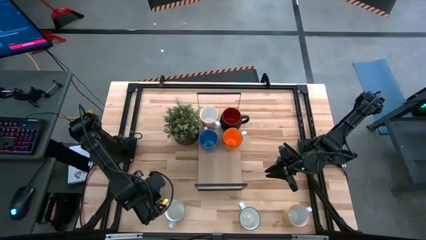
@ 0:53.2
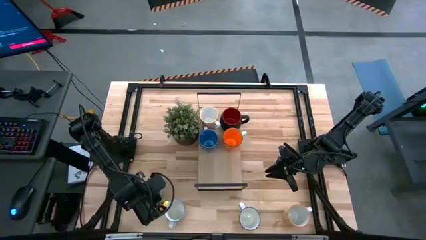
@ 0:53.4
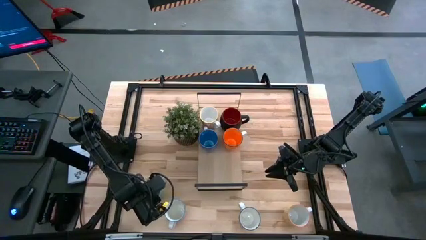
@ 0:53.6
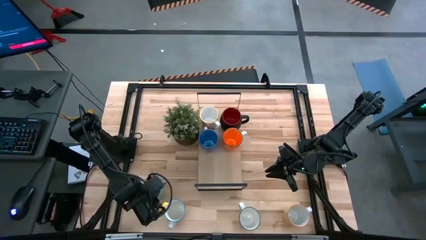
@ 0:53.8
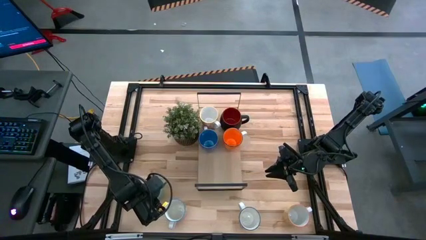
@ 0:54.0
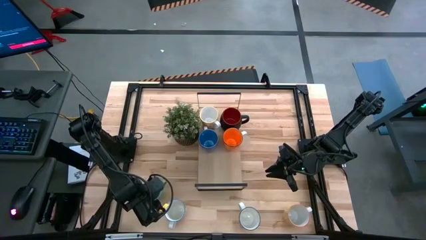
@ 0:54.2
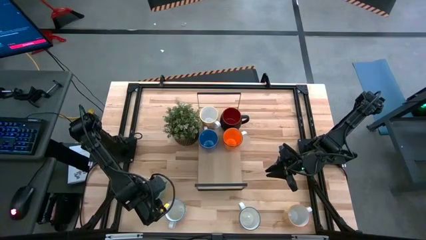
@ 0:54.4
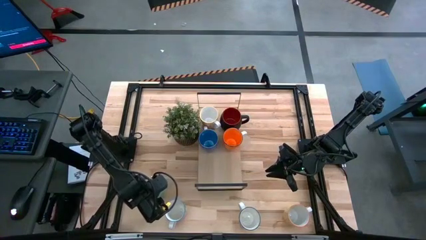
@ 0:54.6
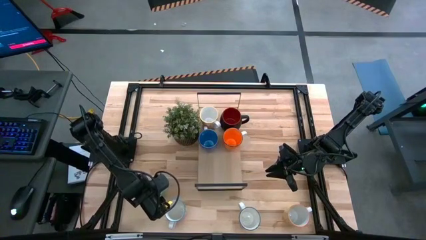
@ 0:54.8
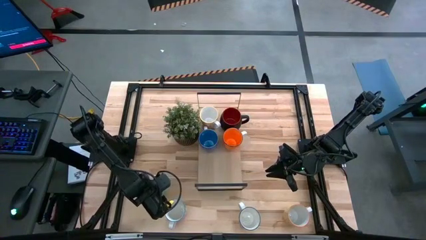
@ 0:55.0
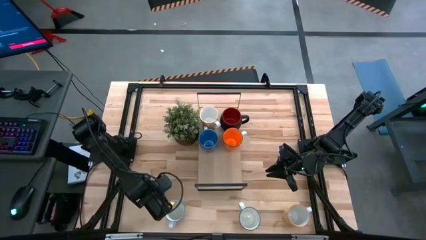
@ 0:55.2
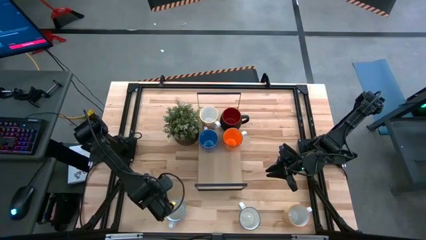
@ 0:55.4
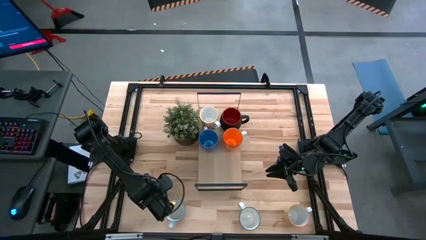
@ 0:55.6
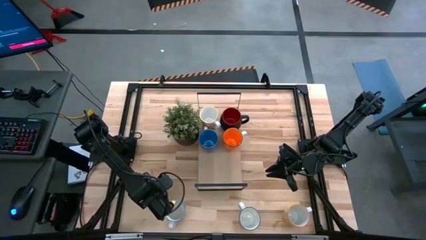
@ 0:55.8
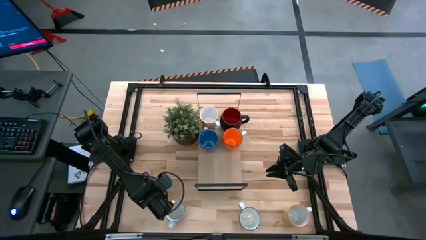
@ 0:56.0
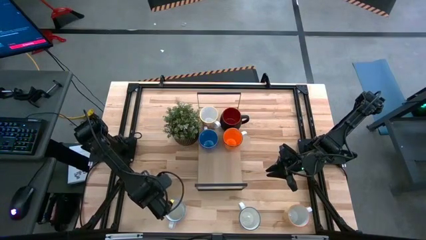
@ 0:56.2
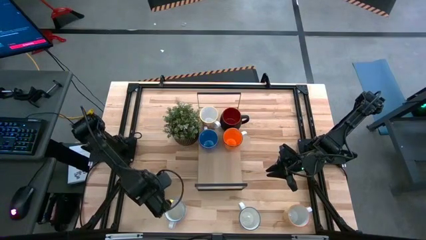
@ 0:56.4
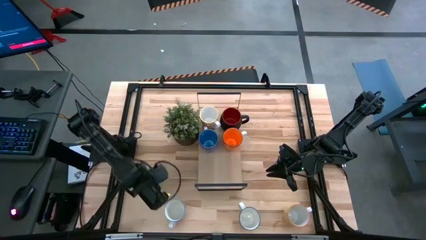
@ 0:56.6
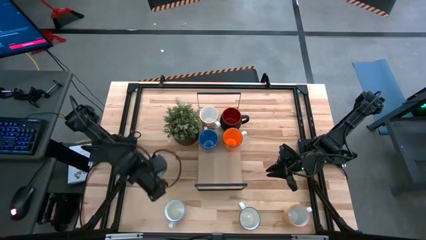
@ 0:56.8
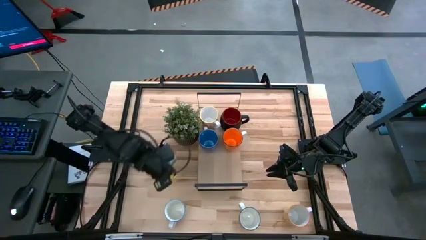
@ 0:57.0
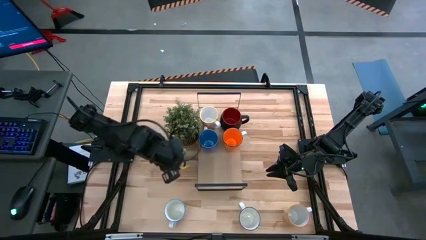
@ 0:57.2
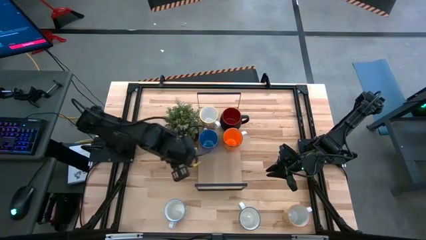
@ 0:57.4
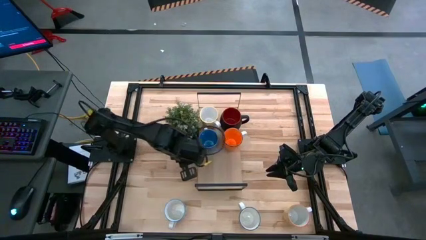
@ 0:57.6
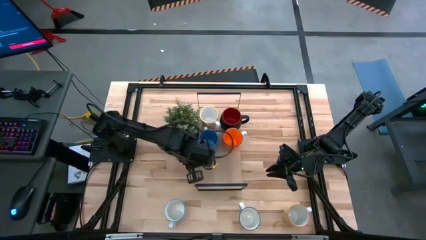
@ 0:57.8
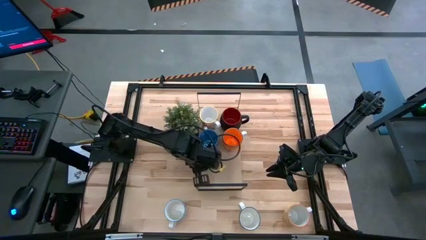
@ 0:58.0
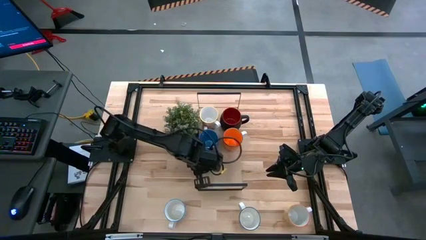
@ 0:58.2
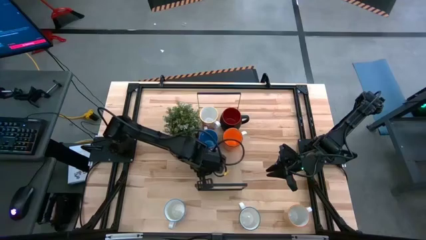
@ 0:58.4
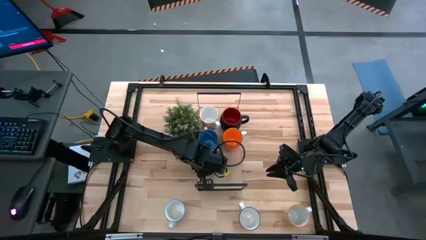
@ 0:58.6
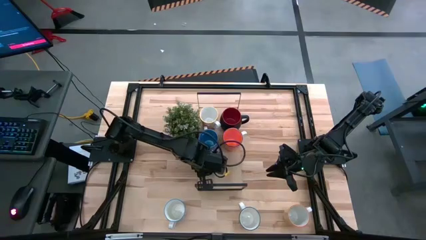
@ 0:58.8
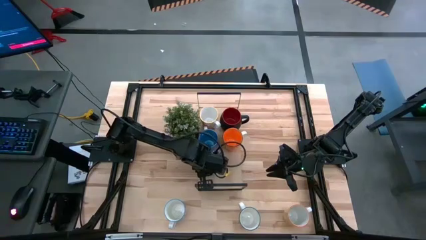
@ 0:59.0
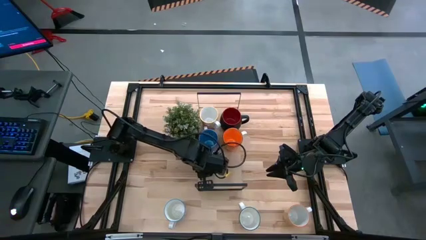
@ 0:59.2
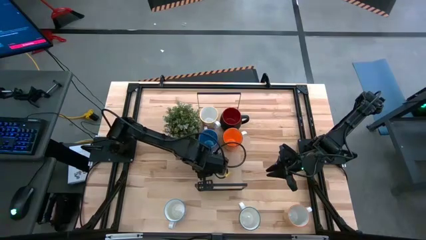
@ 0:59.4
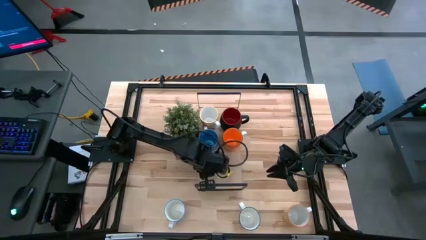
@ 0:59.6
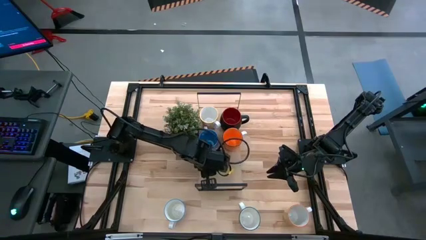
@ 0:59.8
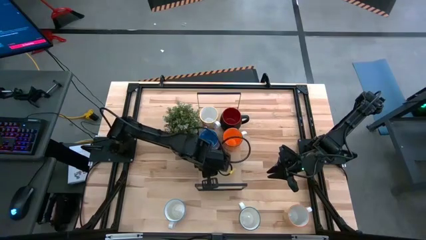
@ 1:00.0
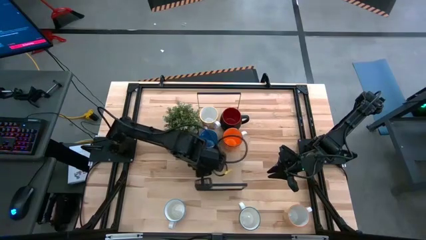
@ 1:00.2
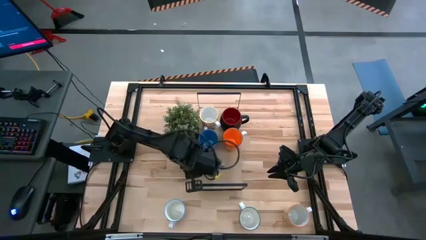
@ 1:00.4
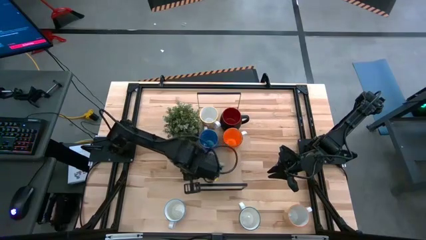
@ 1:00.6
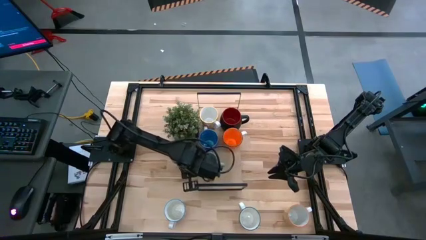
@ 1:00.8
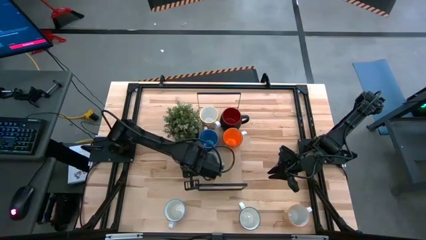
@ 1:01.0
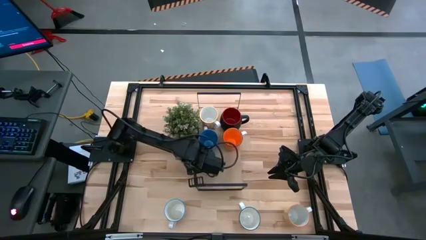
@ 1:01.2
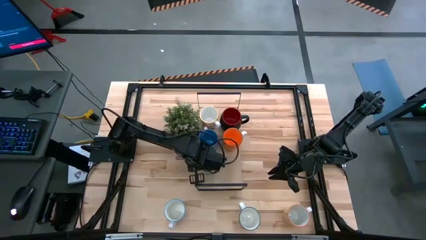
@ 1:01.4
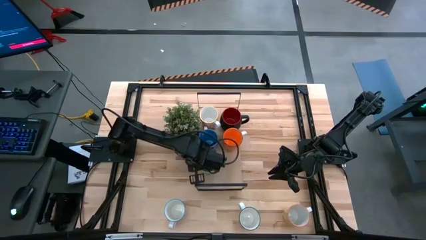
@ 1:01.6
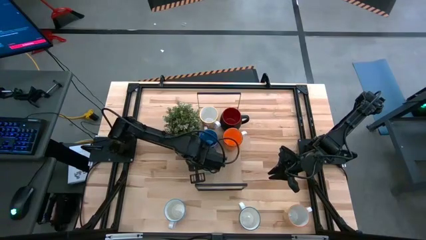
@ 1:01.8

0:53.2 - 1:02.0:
Task: Place coffee mugs
Put the light blue mug on the shelf

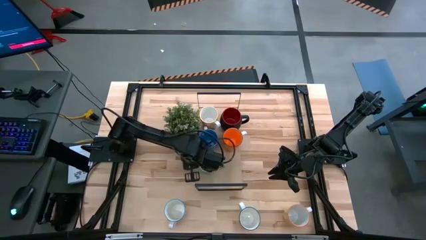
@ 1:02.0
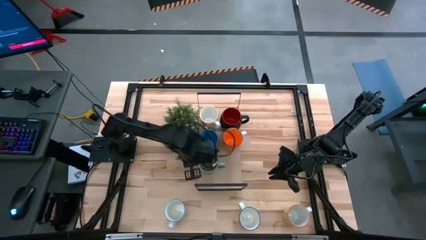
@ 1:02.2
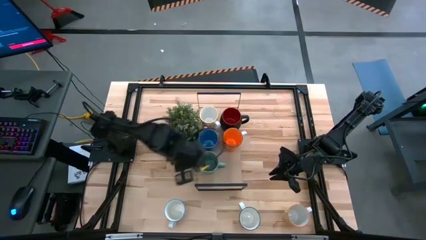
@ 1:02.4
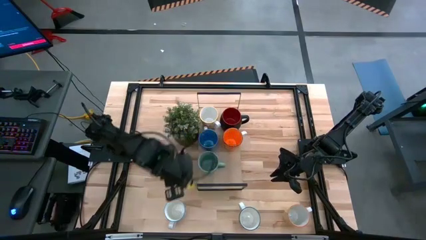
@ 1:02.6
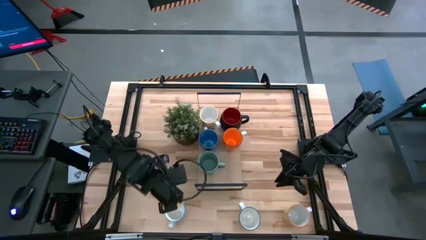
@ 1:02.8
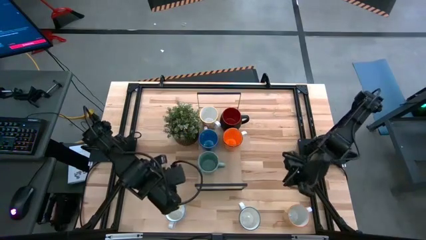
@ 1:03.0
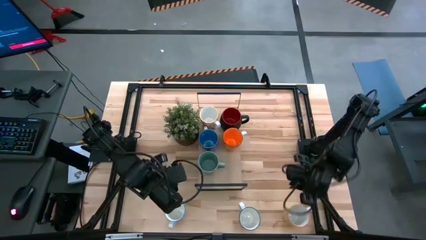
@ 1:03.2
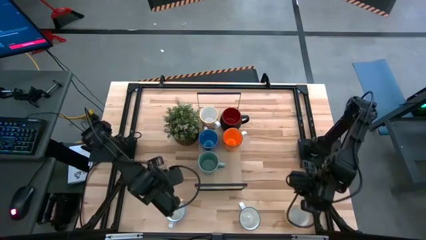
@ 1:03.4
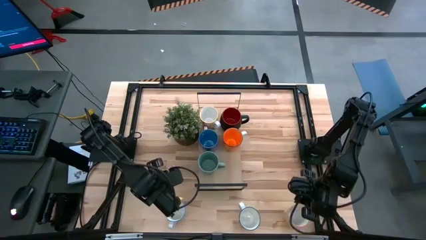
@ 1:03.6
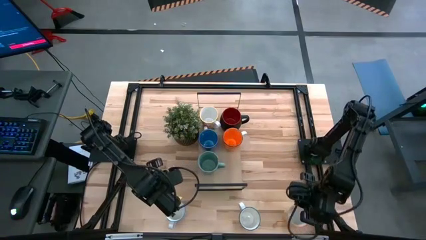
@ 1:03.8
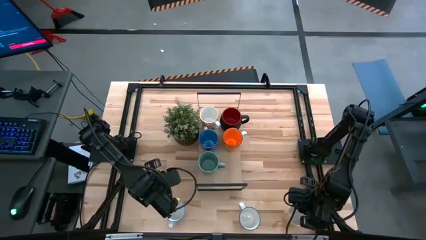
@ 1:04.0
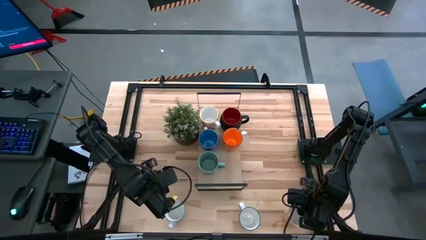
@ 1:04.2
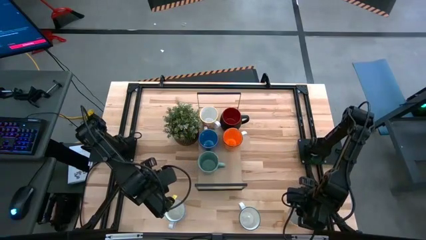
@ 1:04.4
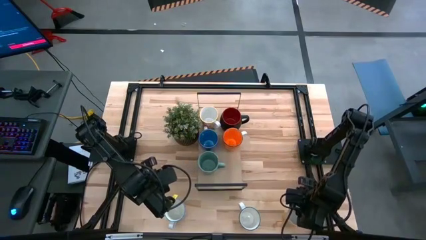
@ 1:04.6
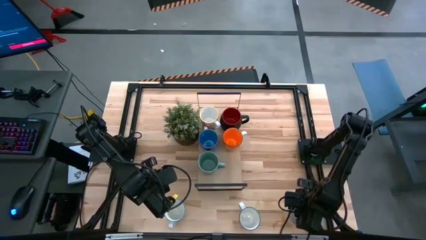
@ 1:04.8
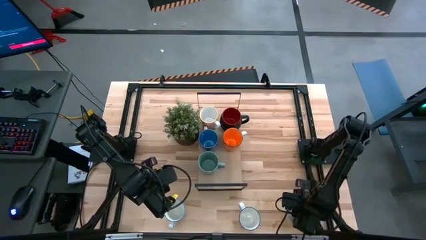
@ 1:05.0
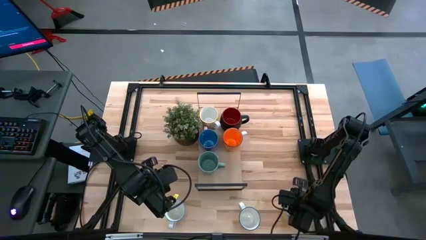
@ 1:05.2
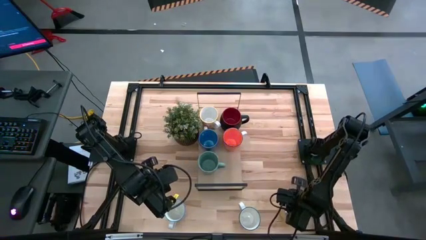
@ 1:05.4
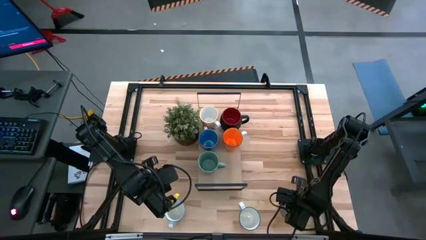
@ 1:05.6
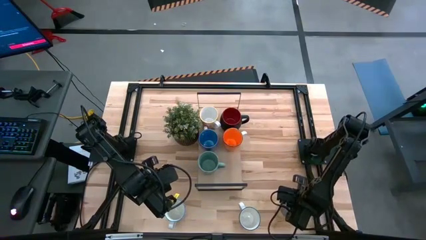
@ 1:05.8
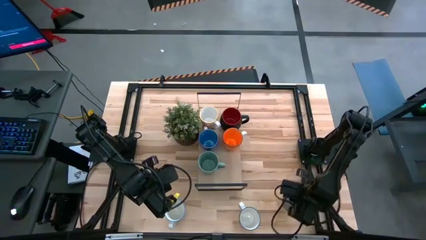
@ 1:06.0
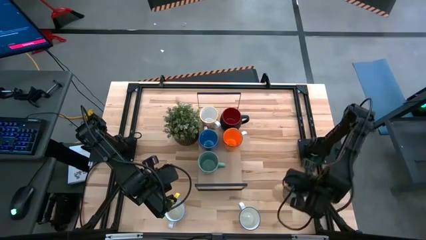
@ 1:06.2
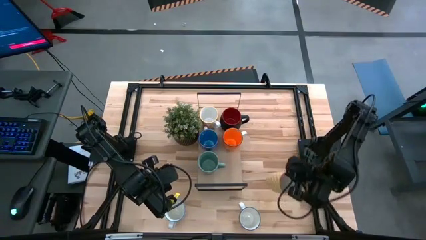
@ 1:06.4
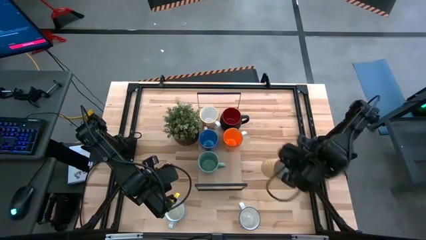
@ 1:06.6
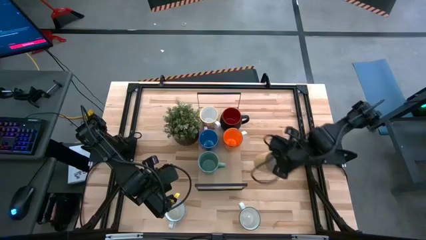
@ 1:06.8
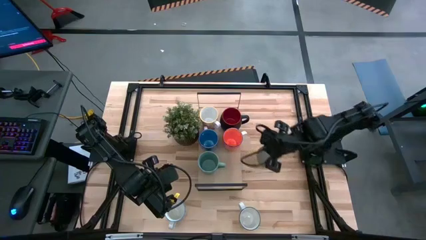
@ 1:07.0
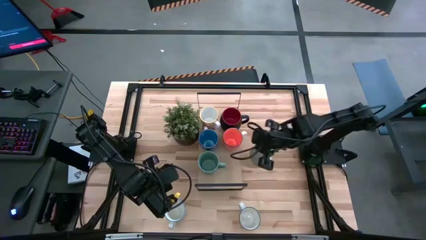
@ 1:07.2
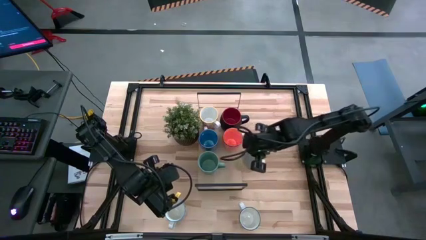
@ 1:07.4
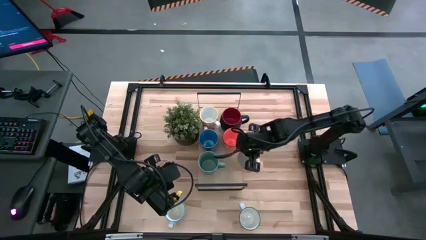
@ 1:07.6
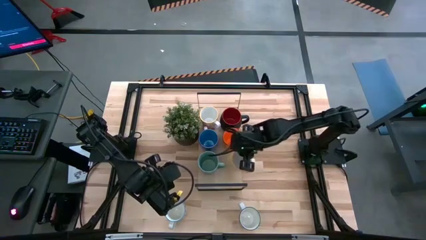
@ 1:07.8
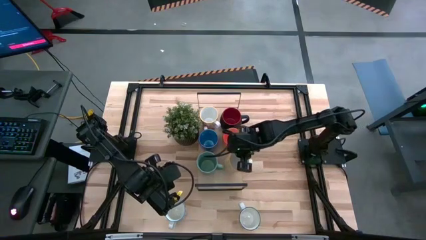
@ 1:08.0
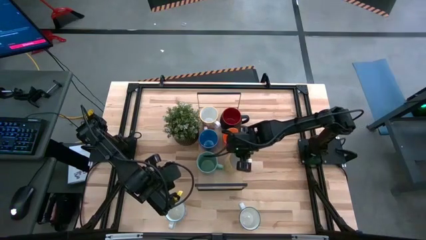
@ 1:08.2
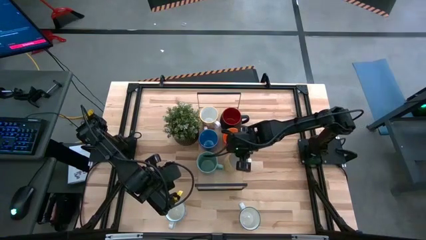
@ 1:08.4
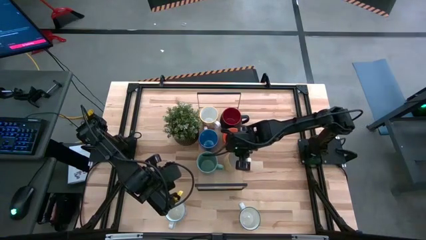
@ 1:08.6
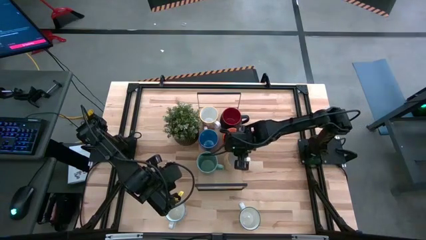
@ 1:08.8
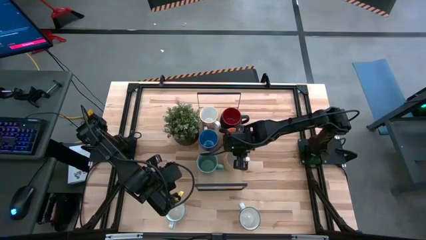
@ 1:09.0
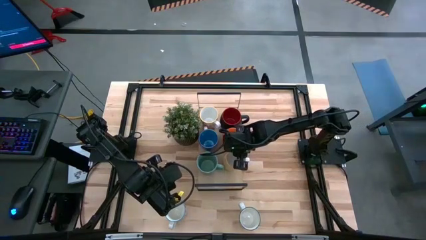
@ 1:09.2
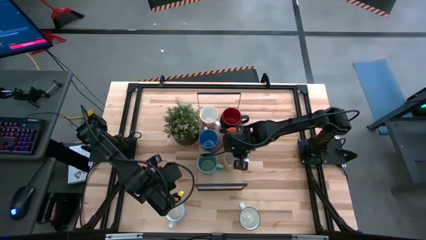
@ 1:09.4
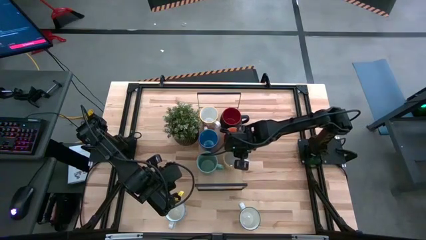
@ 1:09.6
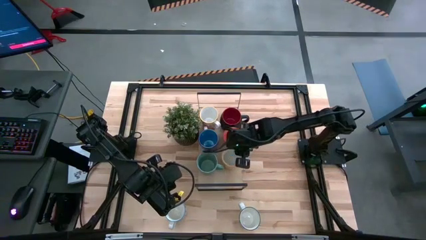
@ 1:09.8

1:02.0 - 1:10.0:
Put the yellow mug on the shelf
